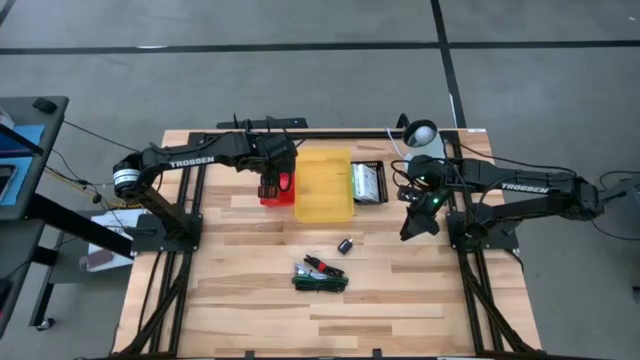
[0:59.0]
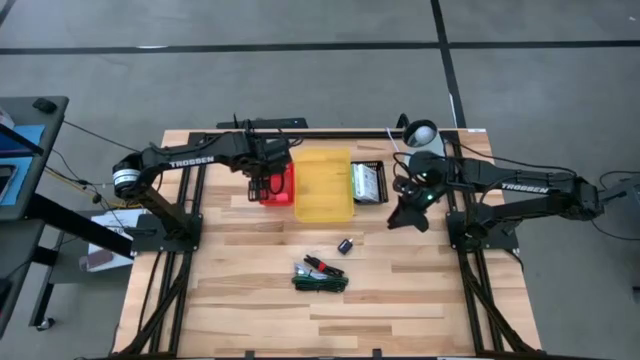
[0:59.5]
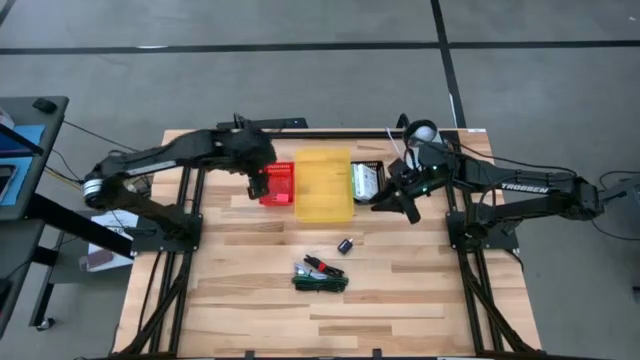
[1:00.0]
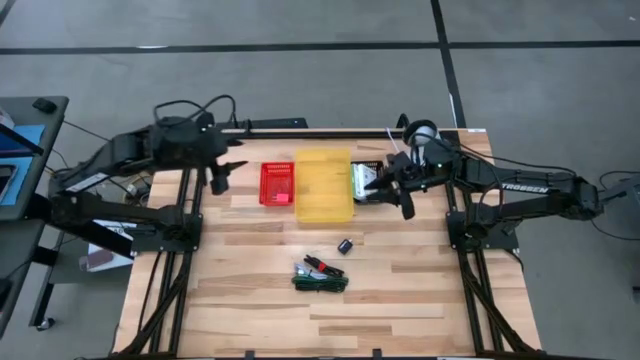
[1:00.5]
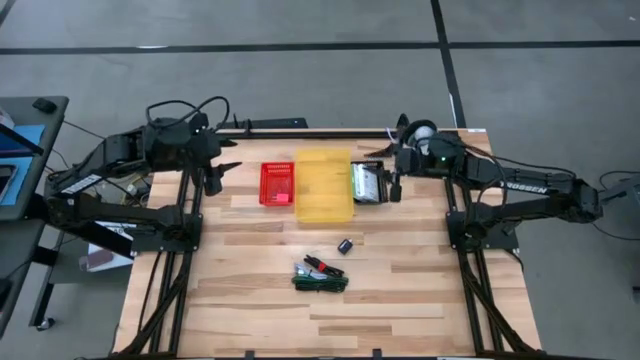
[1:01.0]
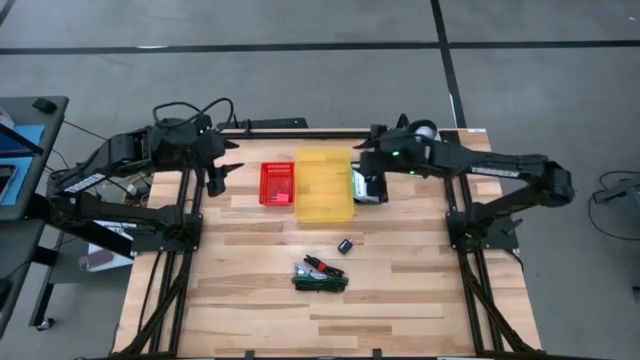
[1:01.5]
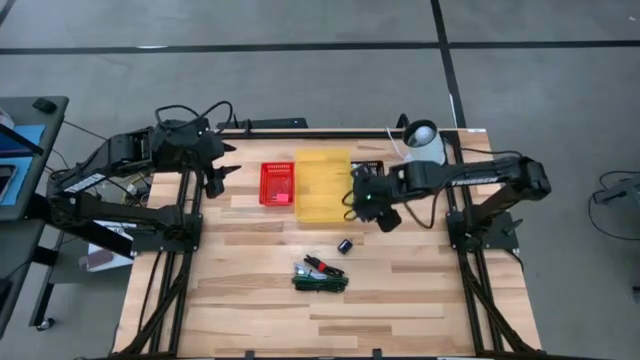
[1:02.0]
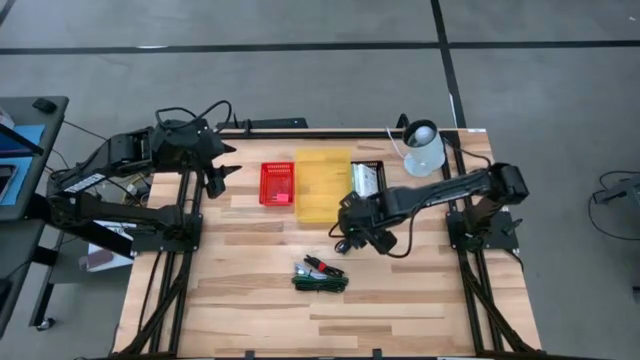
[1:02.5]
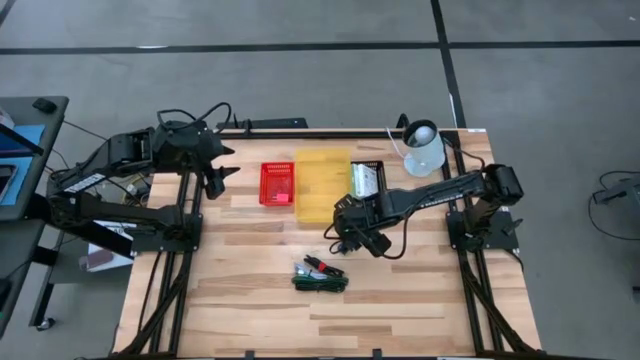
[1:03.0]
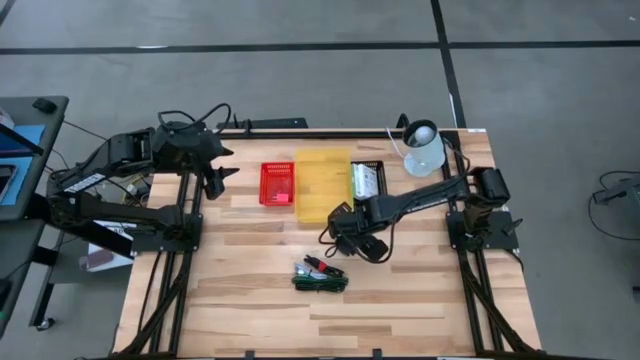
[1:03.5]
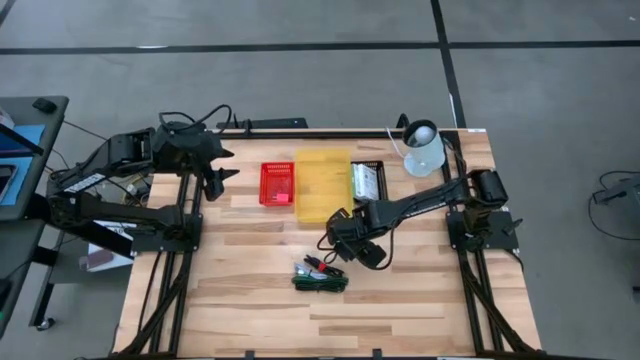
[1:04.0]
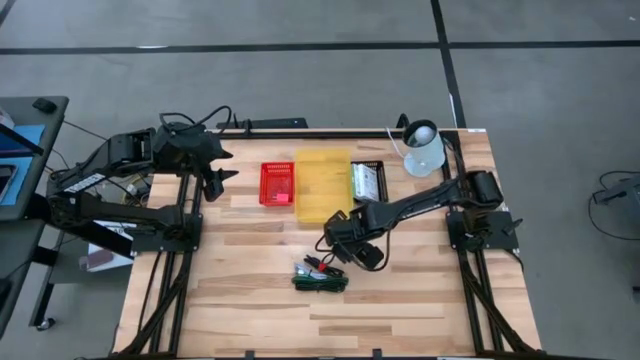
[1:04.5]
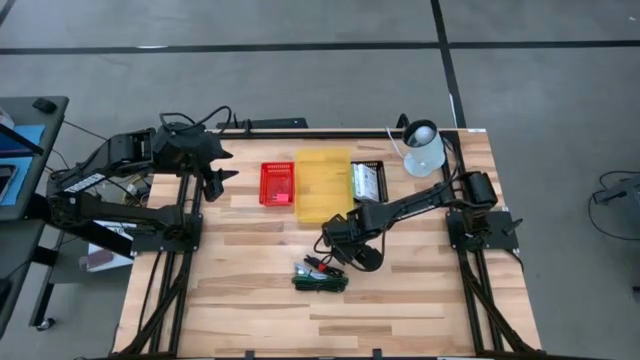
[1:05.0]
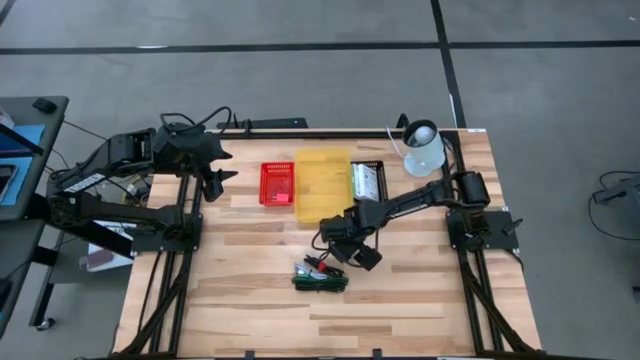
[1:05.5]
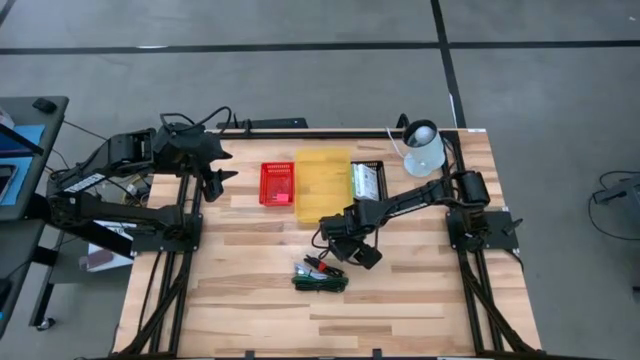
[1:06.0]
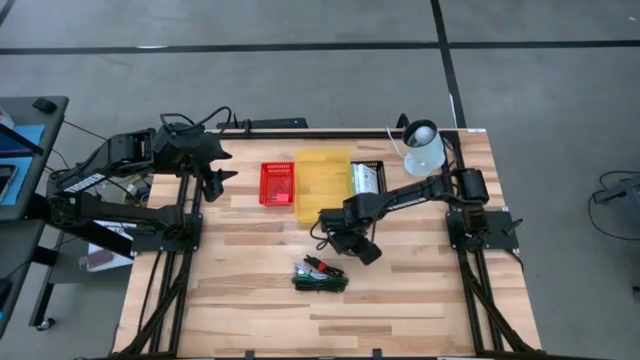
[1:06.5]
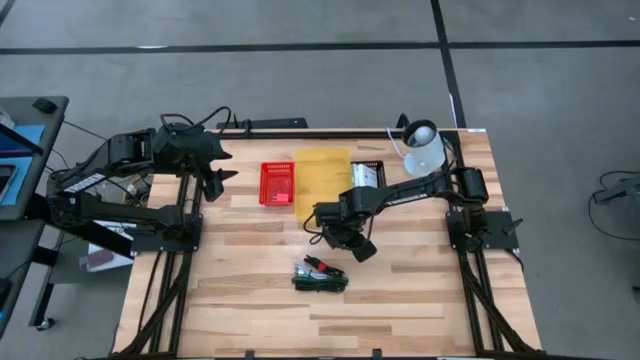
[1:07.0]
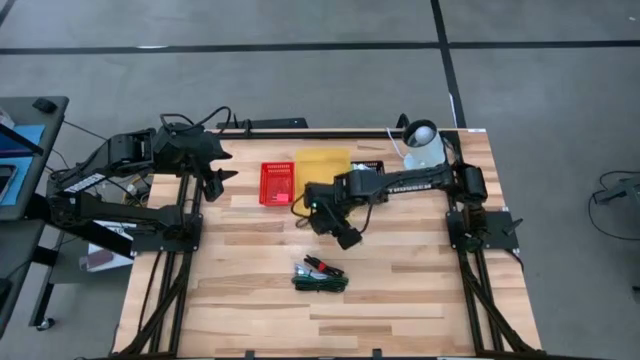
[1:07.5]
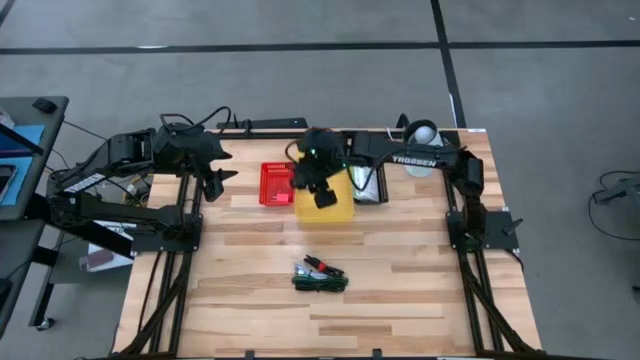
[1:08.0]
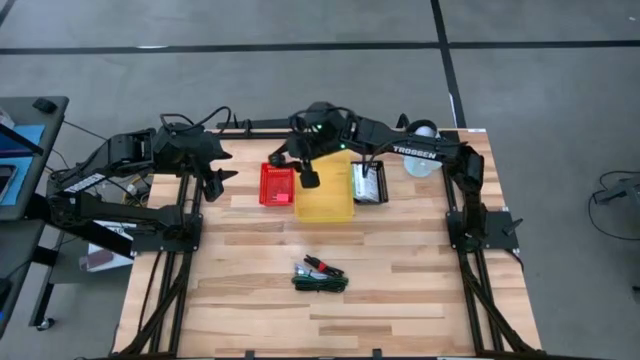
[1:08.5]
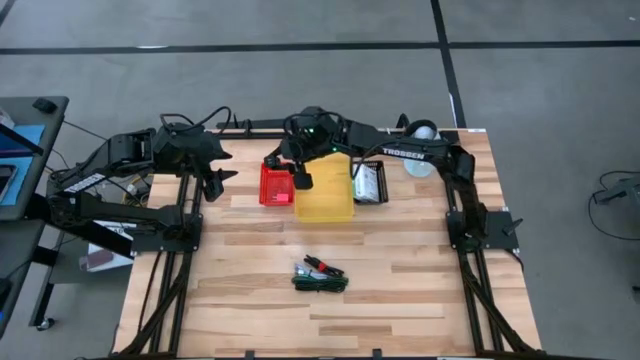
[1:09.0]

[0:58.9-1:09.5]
Task: Pick and place items into bin
Put the black charger adapter into the red bin

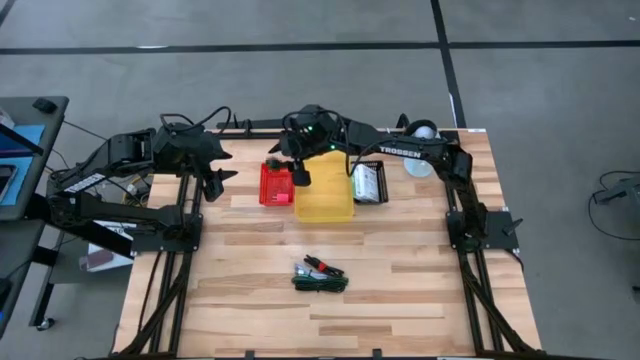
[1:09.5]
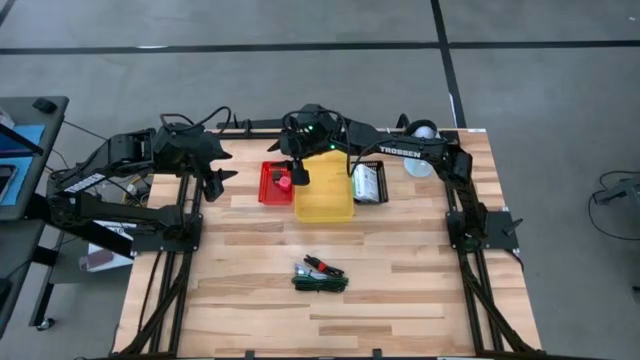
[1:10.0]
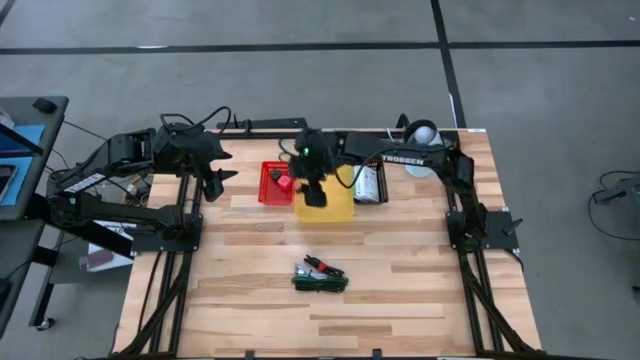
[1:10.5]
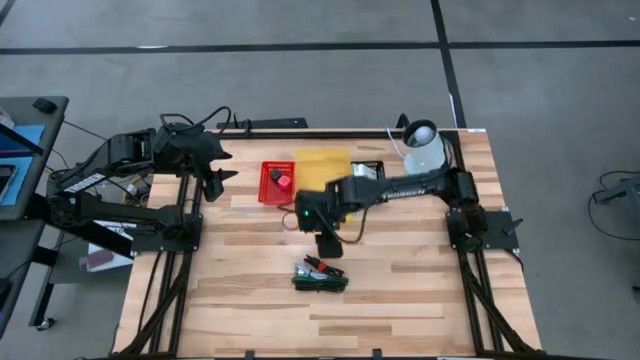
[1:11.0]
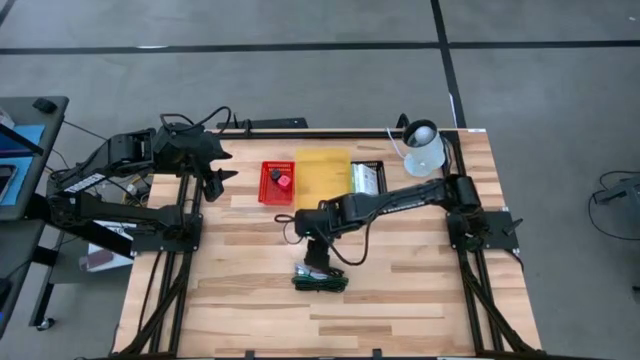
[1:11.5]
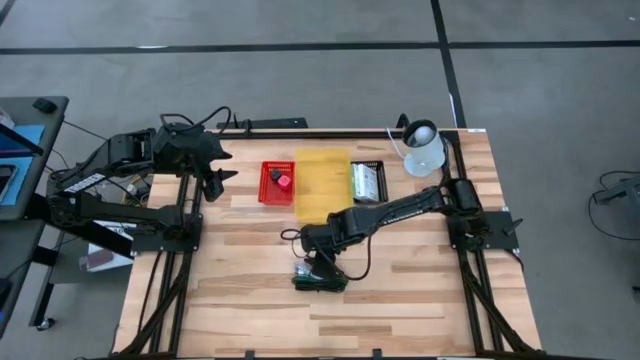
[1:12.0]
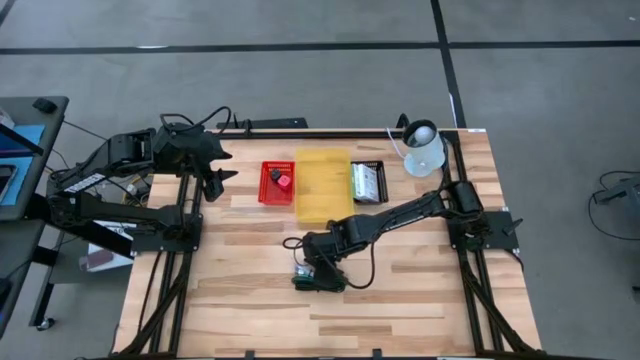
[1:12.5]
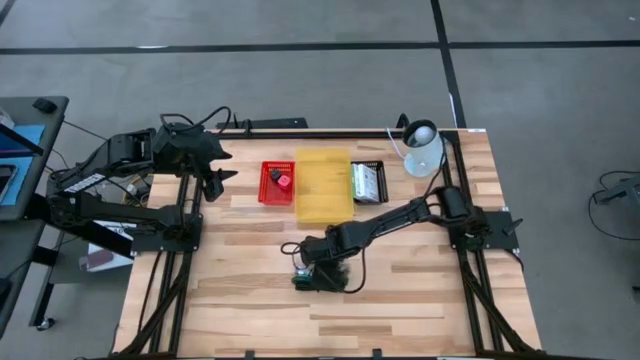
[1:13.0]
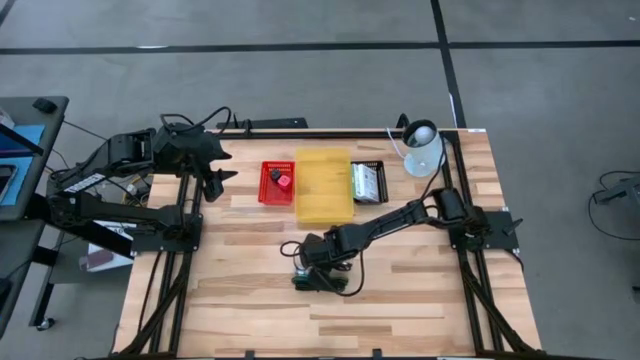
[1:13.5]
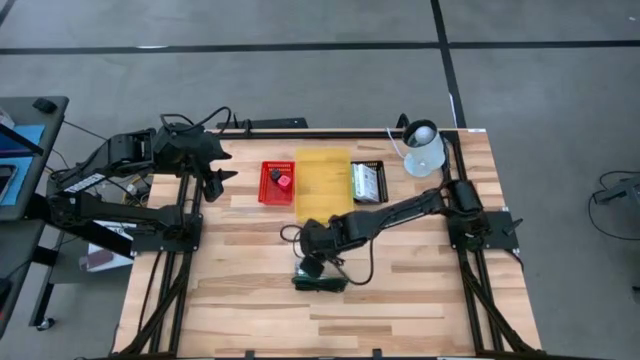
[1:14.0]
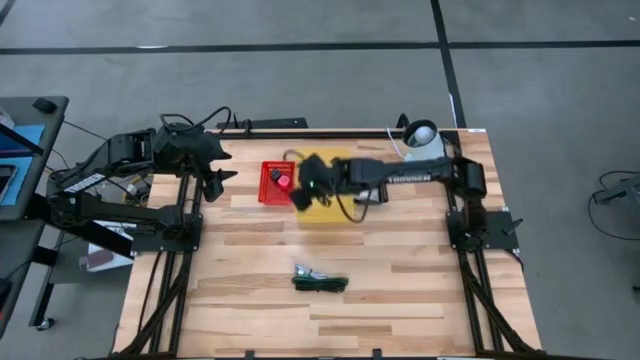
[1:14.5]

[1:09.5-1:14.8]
Put the top black USB cable into the yellow bin

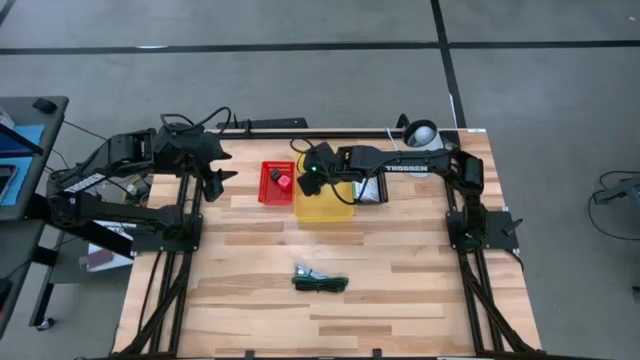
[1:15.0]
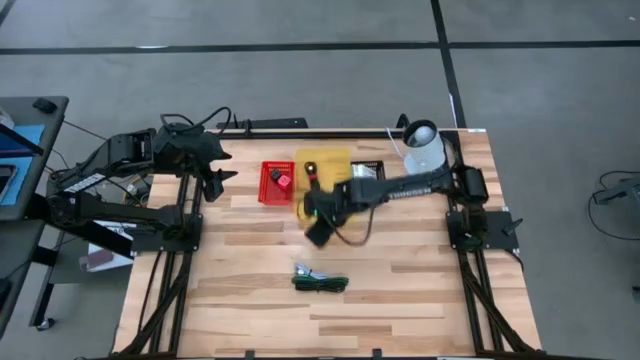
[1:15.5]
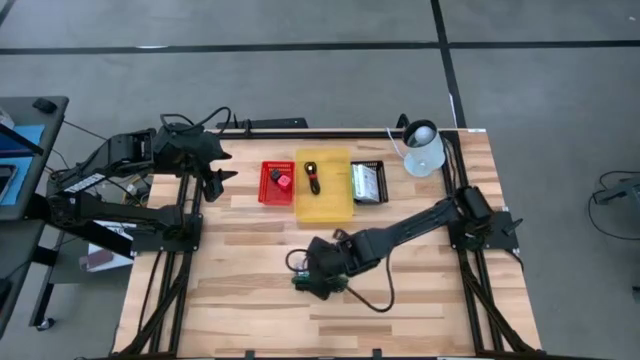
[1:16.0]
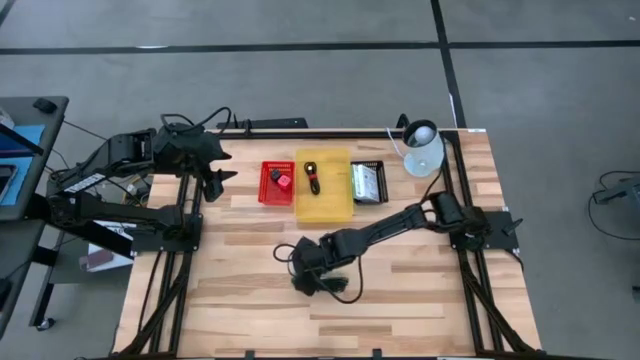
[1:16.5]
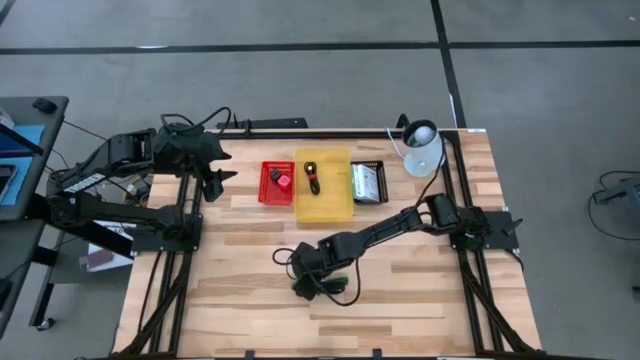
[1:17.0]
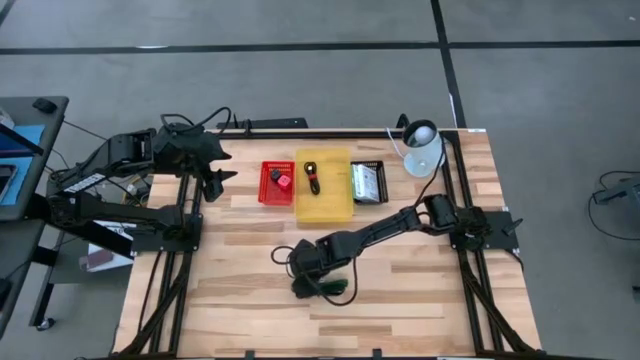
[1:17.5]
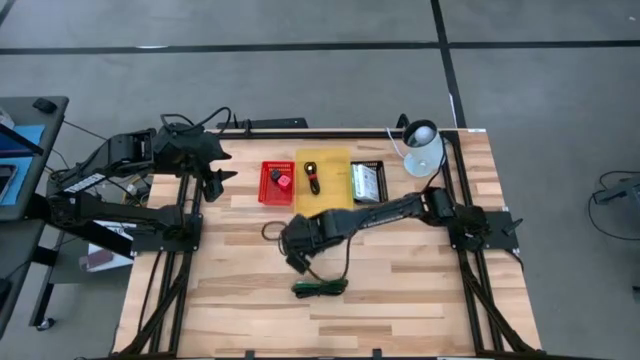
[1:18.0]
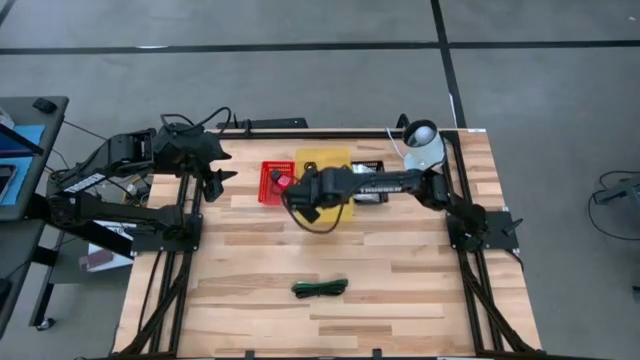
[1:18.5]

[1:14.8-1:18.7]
Put the white USB cable into the yellow bin
